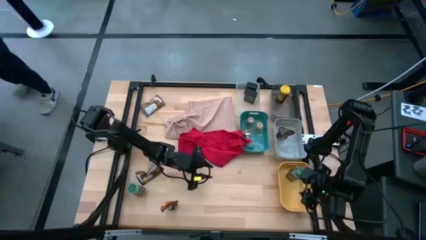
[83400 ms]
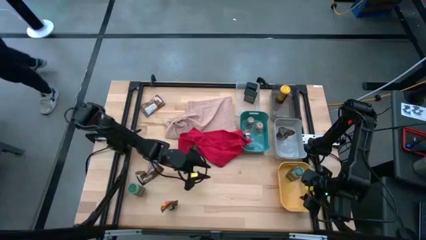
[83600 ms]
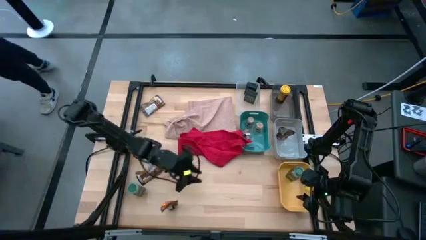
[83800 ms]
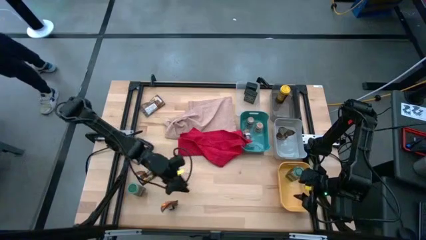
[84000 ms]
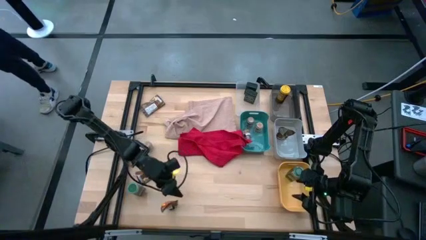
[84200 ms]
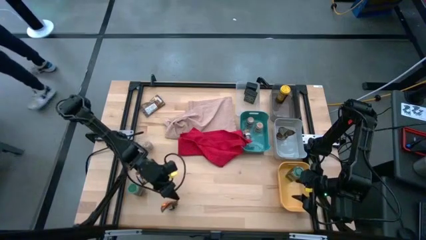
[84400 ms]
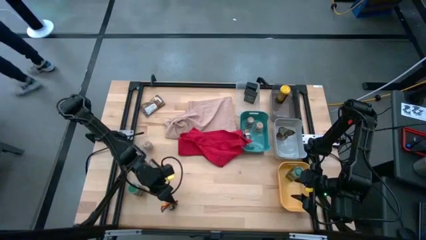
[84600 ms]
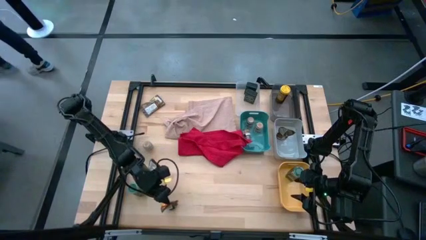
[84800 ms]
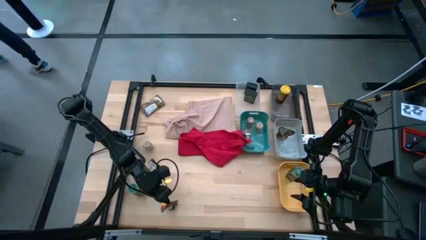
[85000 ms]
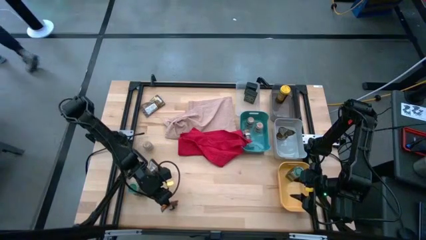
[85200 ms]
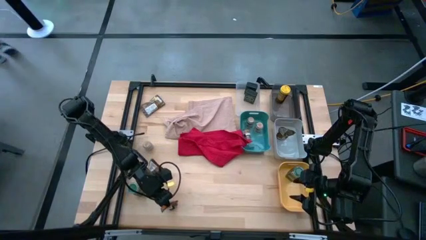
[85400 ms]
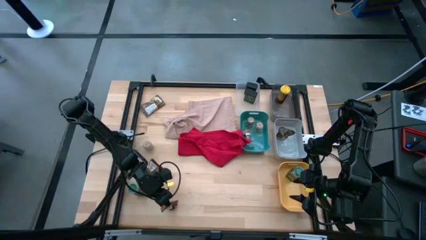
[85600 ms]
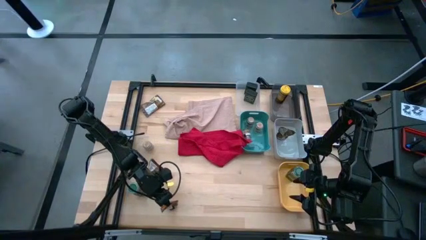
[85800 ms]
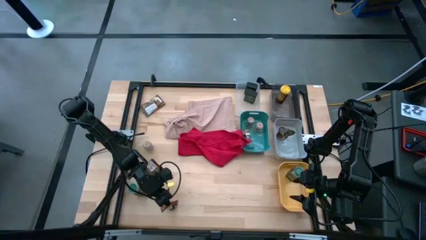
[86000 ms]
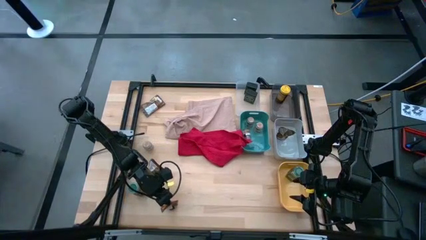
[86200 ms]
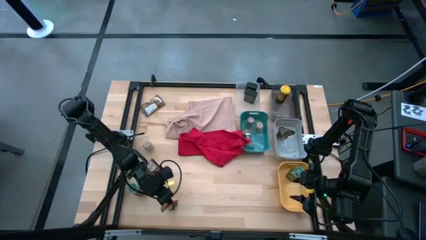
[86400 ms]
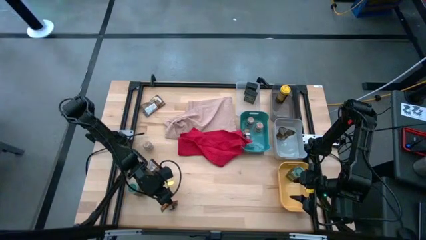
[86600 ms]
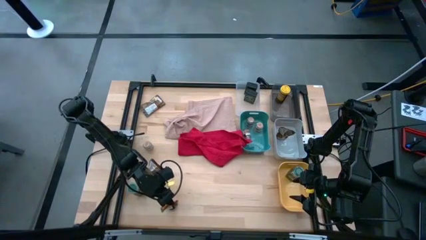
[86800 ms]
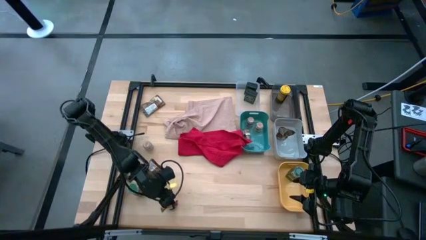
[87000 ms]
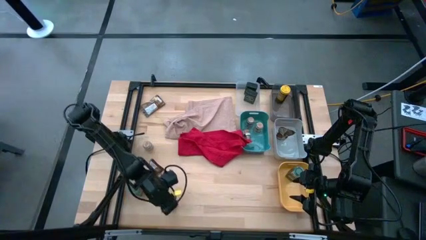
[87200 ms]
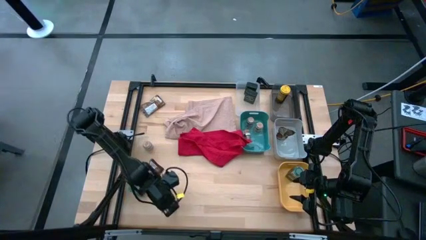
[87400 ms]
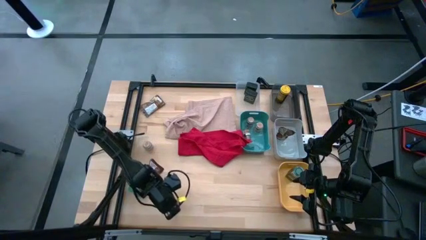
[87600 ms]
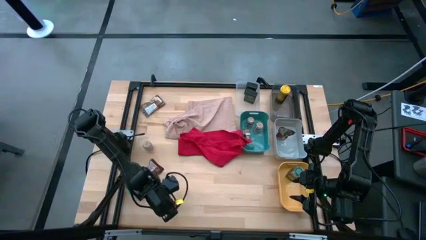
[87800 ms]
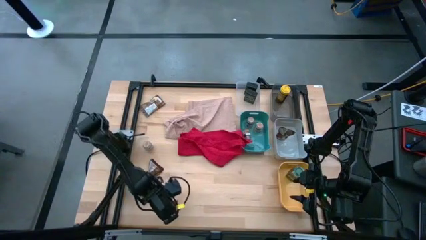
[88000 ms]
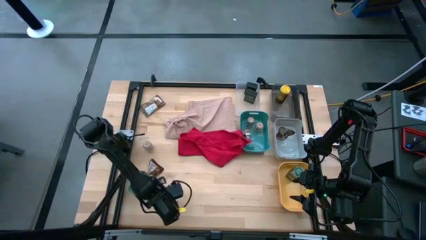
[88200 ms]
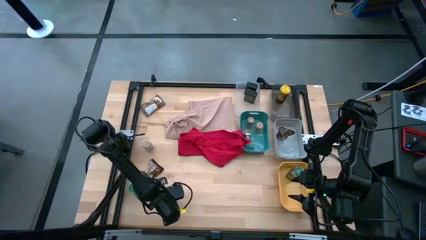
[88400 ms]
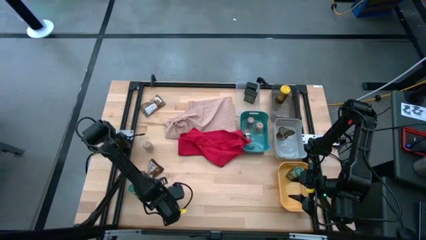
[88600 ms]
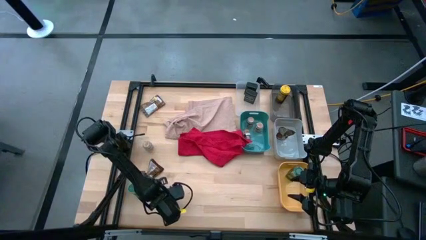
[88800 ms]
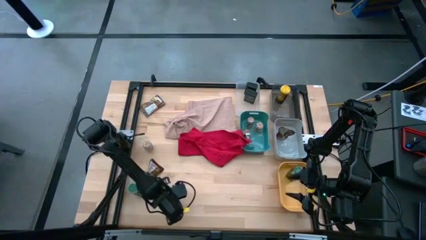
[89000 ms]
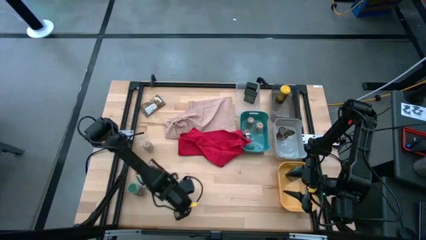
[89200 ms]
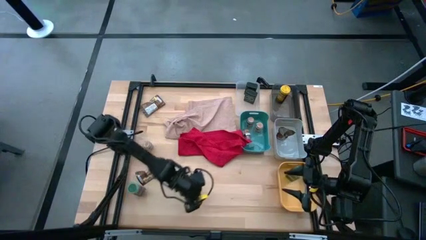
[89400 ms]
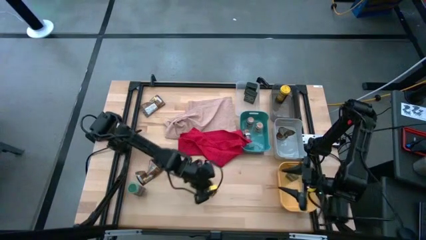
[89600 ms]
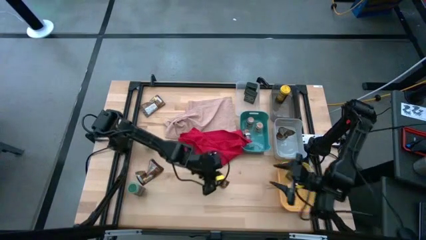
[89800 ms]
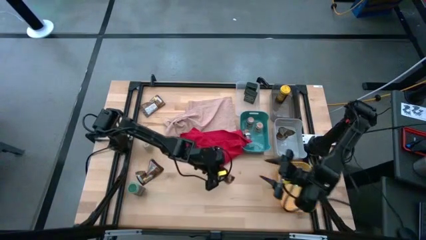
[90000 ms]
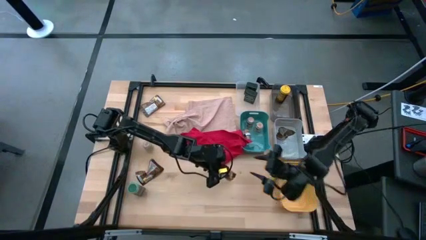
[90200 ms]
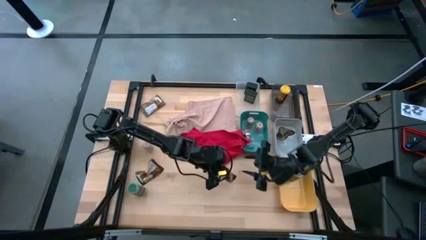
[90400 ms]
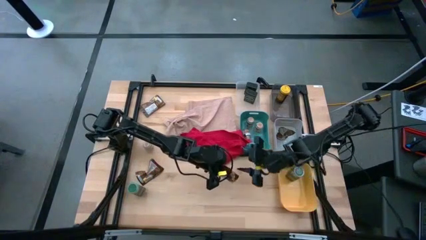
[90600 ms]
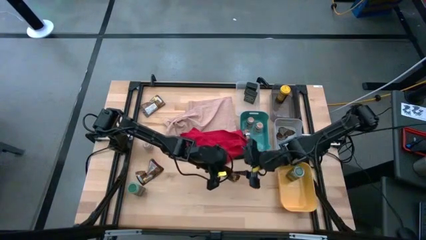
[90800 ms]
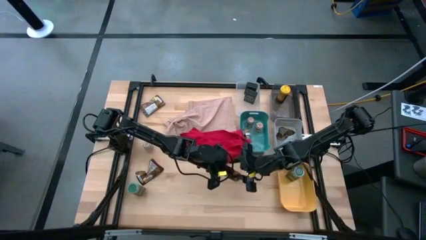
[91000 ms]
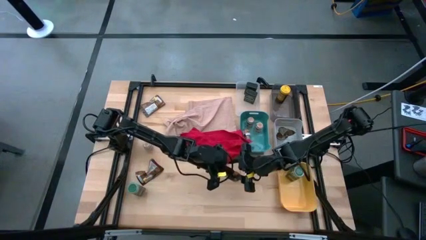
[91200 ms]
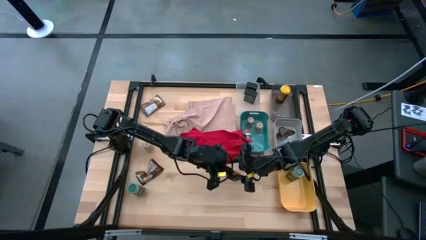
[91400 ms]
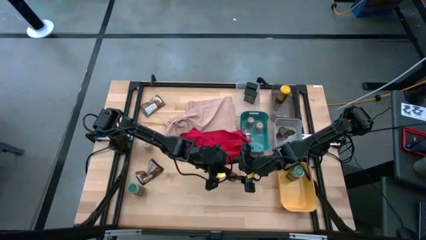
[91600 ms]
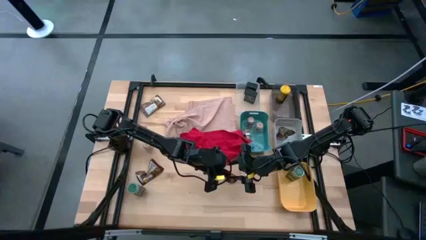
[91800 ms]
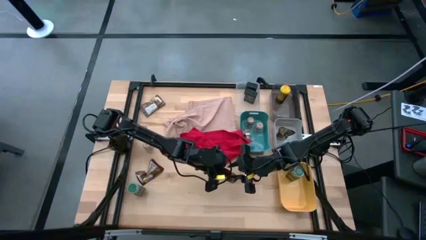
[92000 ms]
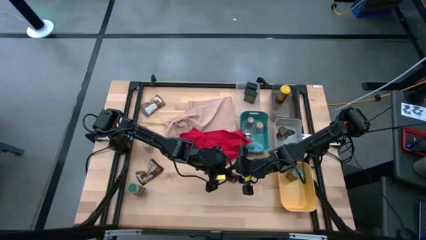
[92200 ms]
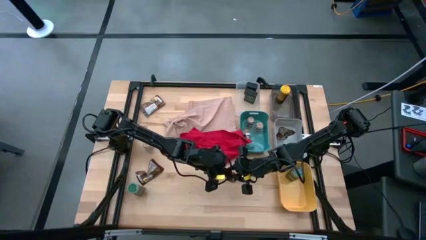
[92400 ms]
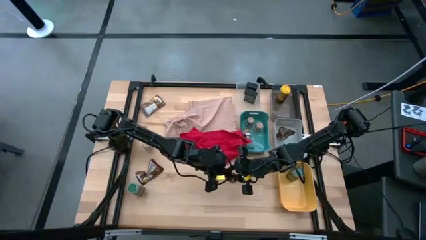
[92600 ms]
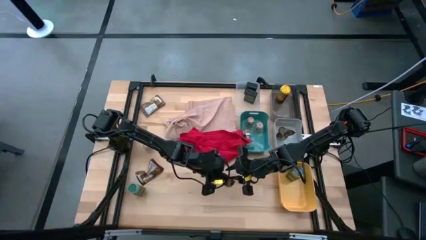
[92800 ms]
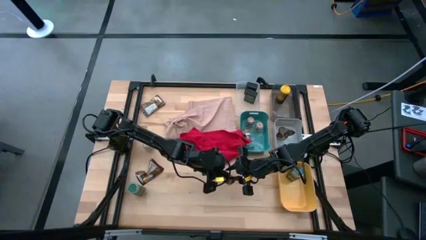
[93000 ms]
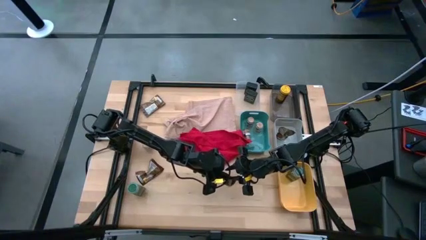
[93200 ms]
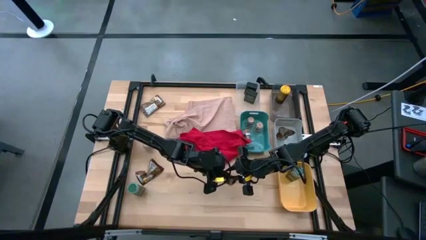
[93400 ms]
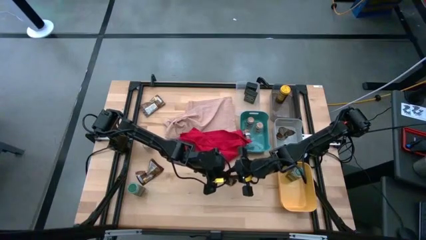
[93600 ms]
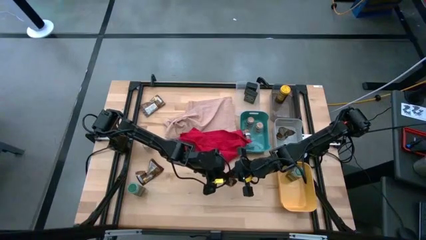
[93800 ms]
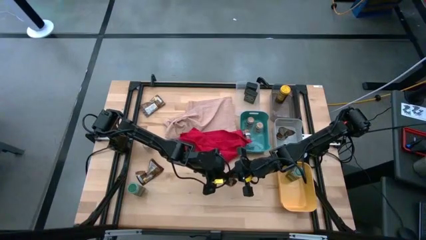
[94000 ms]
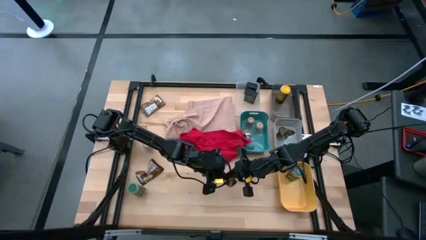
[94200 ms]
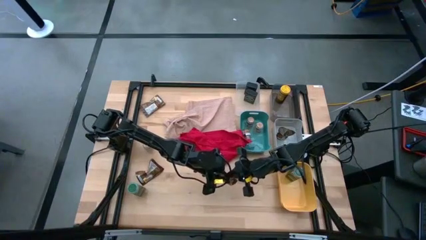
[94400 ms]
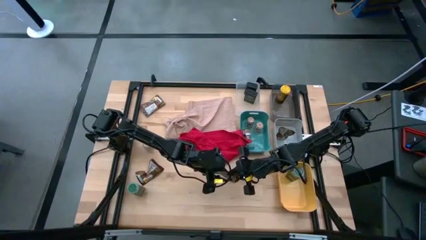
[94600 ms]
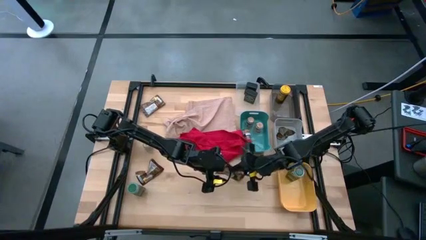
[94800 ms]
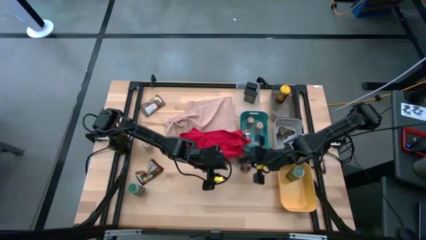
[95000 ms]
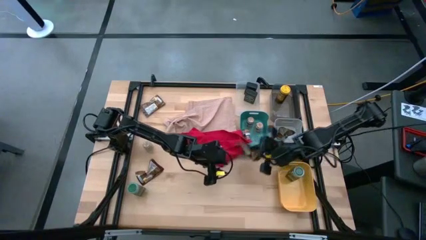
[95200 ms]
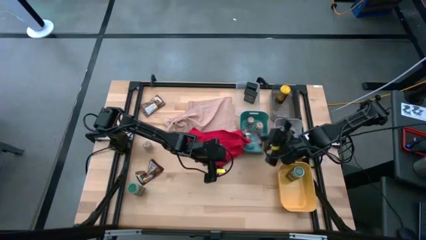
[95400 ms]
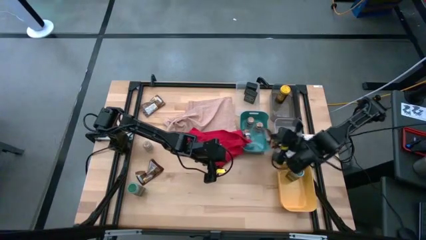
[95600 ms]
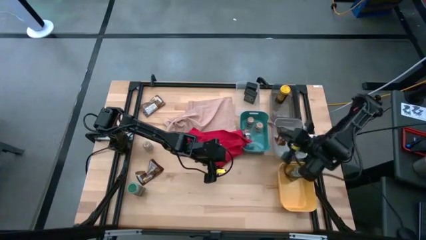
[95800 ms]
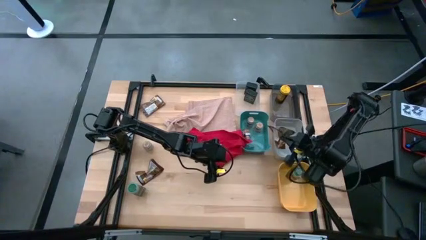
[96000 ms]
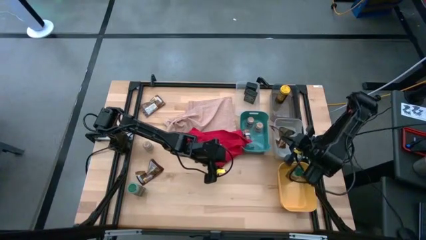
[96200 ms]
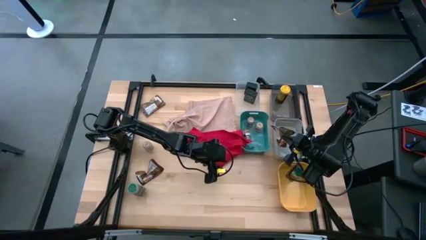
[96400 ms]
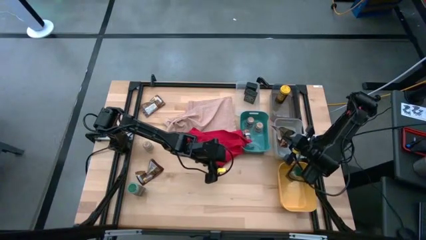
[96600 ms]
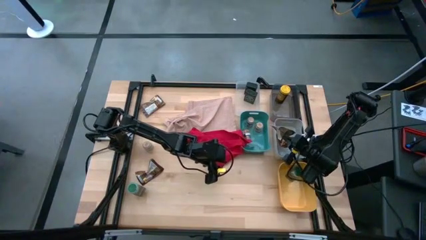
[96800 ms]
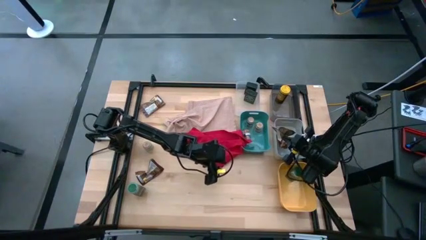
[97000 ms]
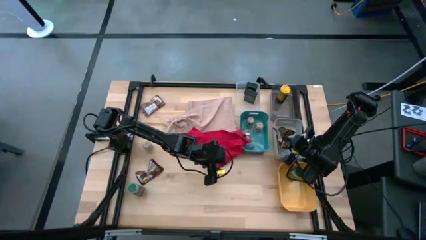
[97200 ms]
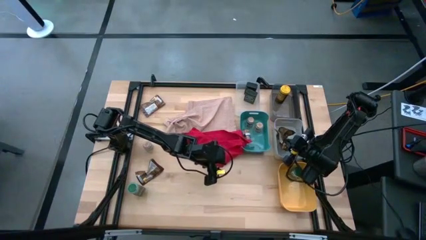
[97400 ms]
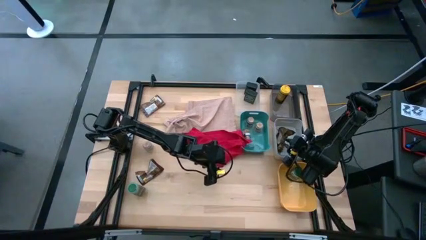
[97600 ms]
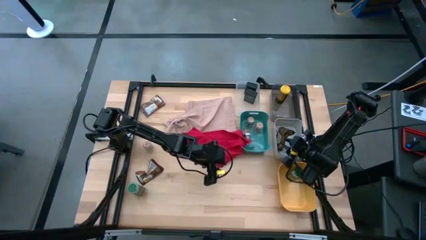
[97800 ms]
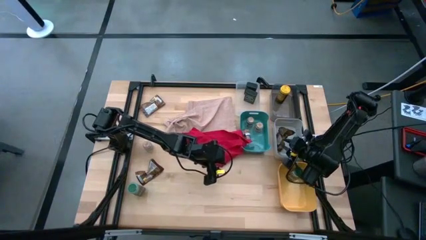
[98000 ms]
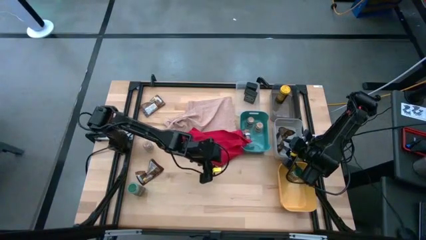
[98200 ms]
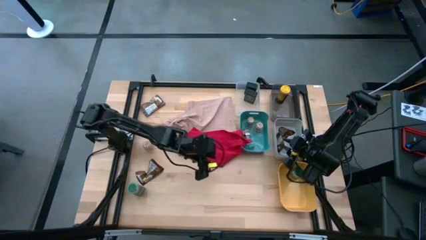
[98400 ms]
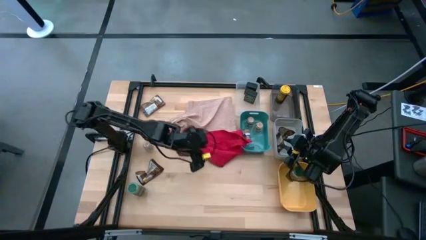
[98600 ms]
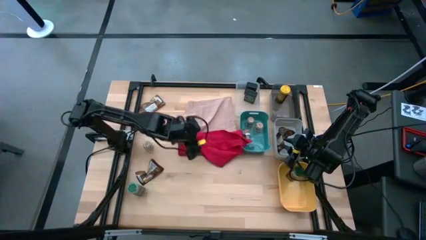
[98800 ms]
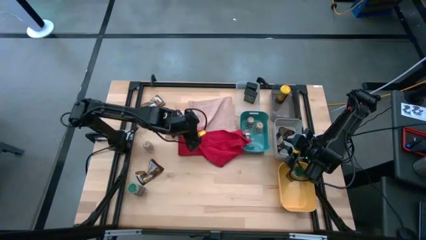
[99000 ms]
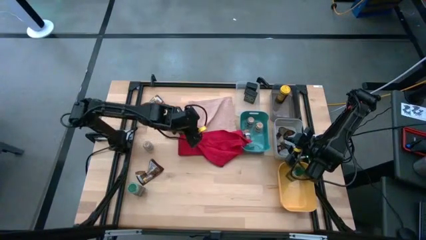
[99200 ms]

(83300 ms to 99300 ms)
Task: Sort spices by type
Put the bottom orange pouch seasoning into the light blue bin
